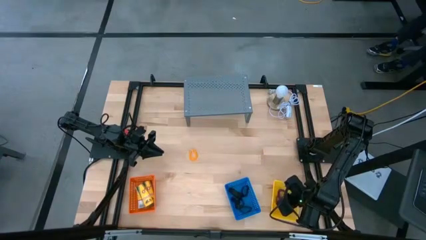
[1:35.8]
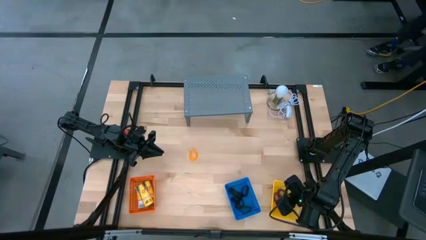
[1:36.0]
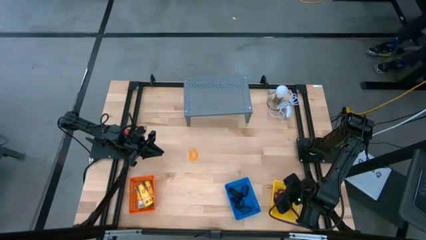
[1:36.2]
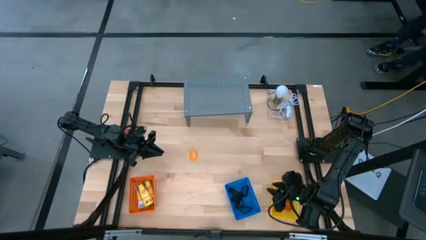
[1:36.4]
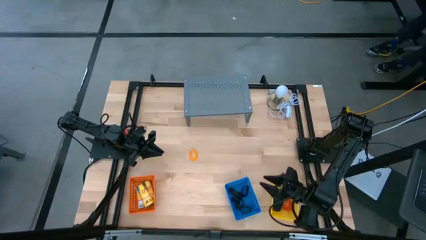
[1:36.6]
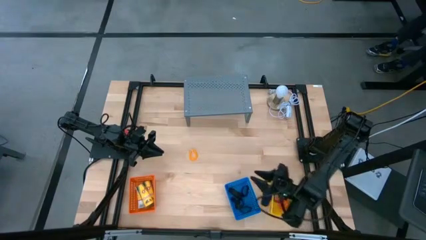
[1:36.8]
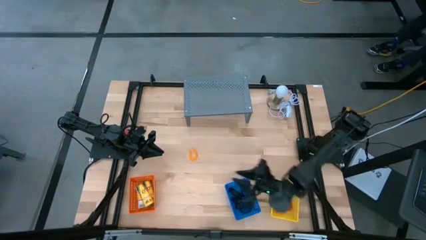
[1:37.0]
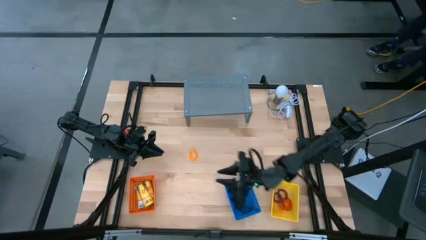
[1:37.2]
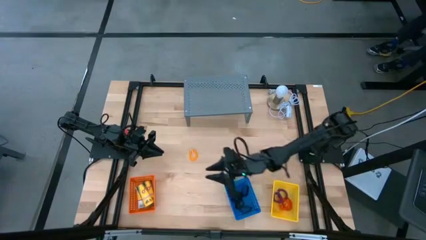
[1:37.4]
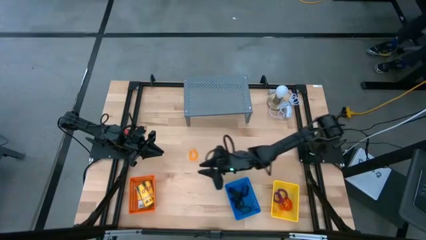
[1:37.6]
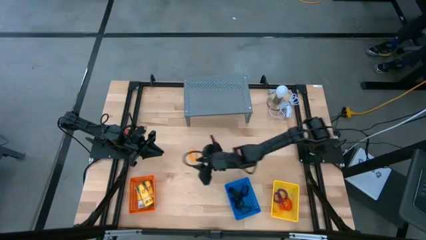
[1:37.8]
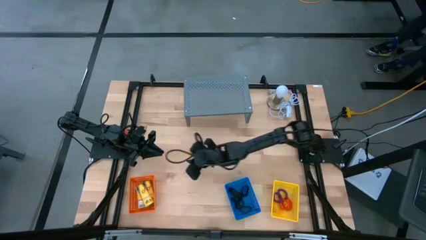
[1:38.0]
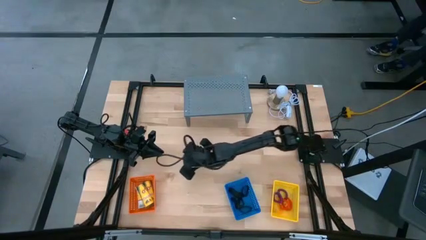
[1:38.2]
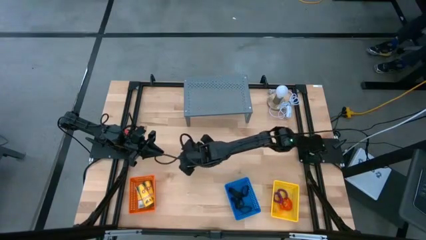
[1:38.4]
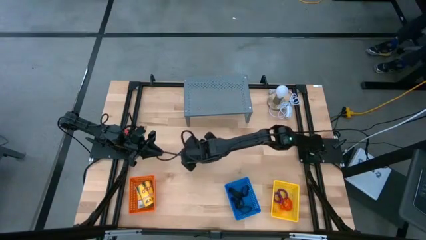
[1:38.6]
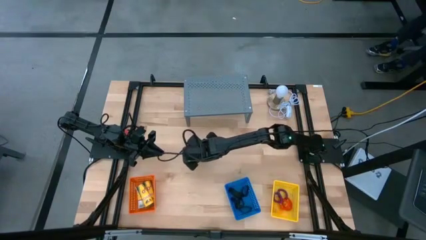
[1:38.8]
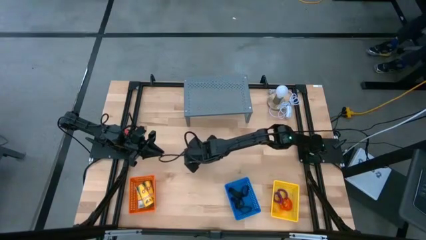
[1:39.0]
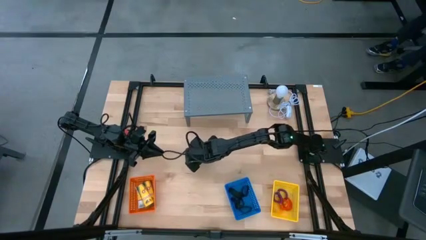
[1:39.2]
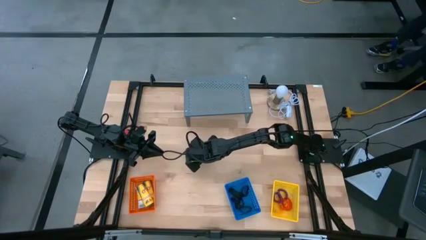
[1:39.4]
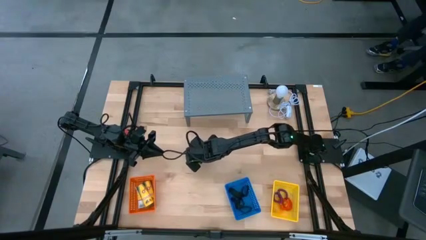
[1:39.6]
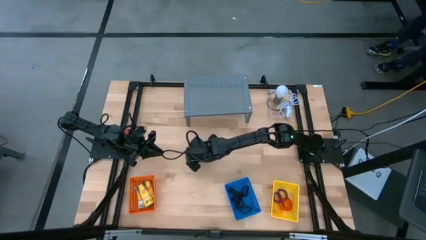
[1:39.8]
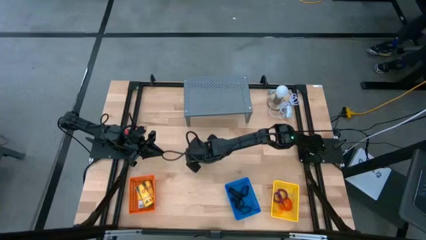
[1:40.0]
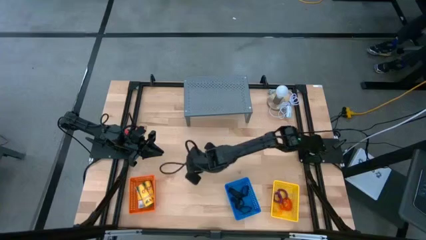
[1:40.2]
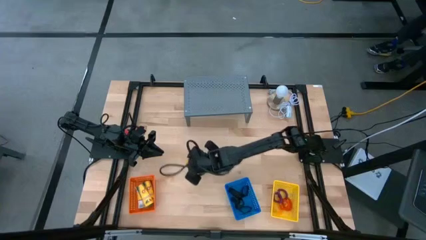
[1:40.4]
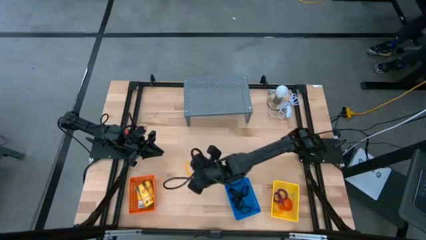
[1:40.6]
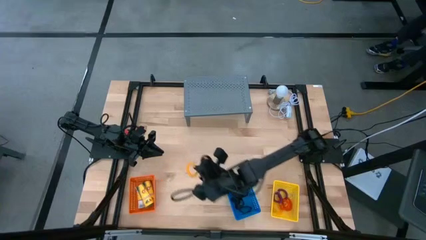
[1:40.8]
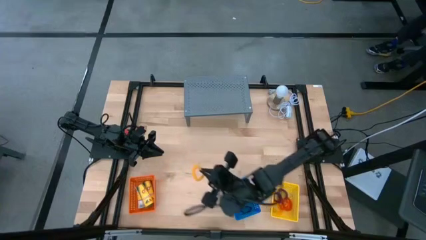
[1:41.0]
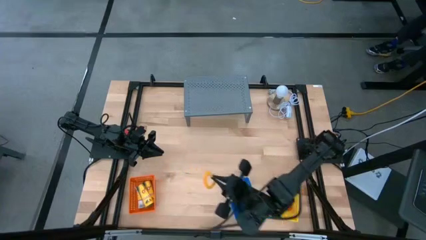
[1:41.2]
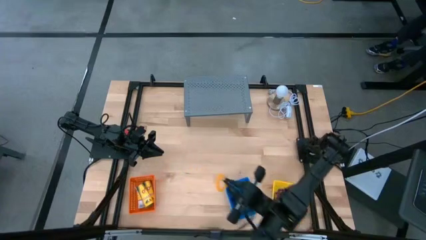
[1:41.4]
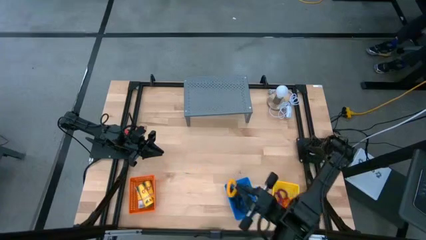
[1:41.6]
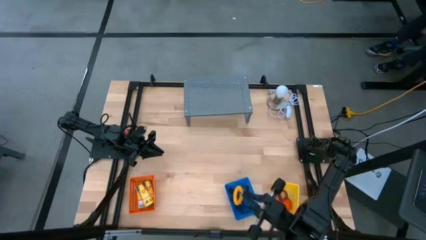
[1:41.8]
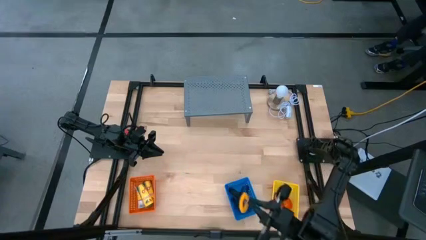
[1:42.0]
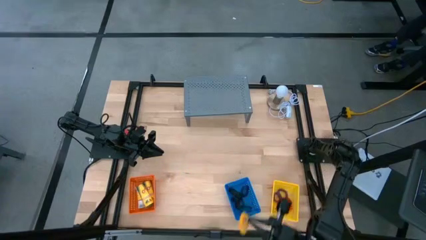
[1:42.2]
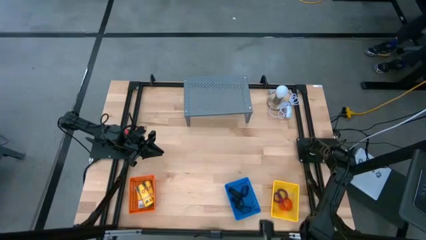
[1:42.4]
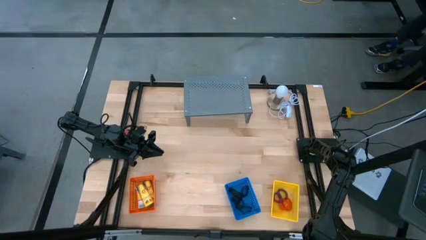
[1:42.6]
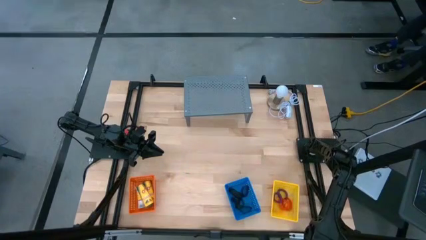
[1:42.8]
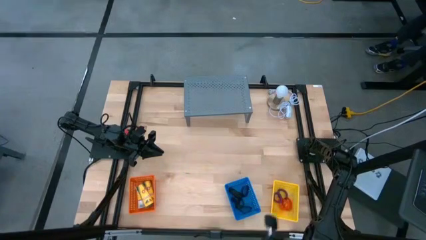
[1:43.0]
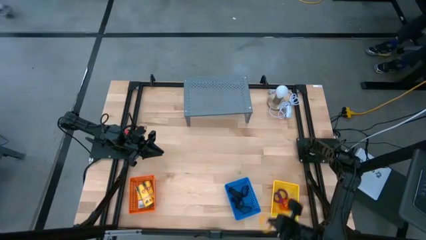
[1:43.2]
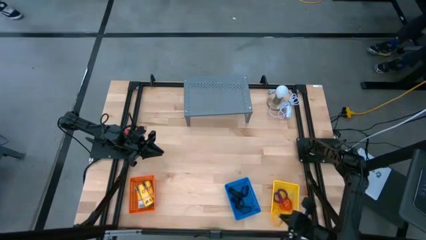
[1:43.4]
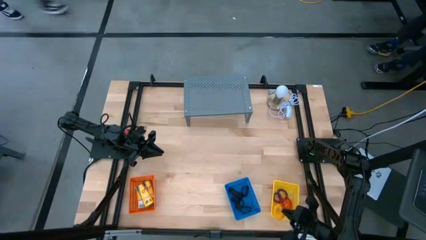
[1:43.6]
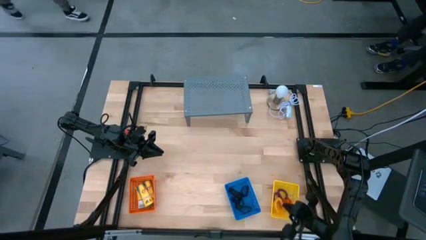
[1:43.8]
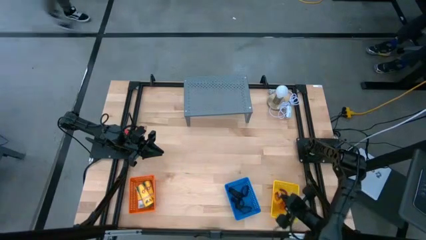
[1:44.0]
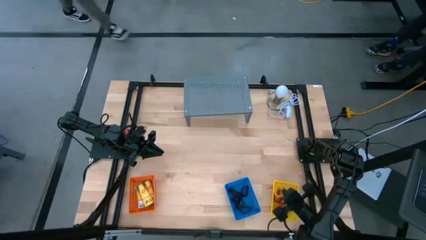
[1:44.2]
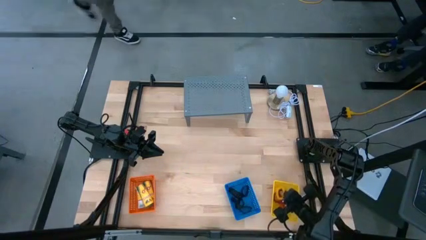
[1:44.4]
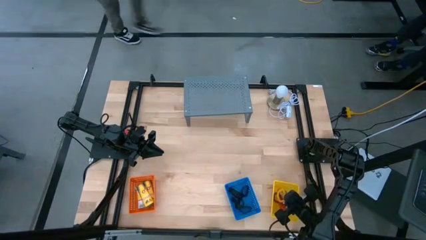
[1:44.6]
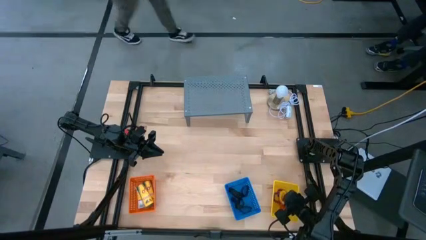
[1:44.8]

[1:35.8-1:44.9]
Task: Pick & Place Office Desk Supplies
Put the yellow spring keychain into the yellow bin

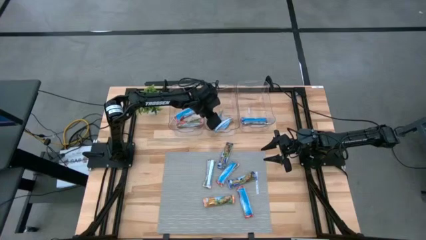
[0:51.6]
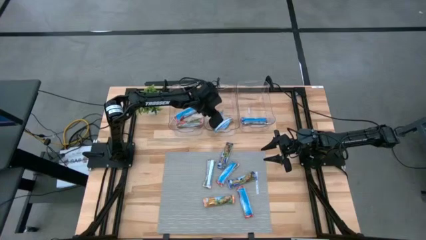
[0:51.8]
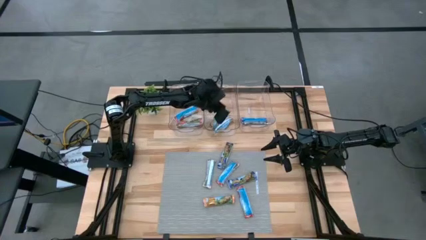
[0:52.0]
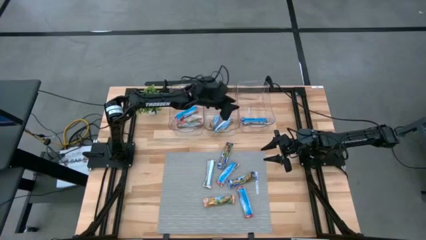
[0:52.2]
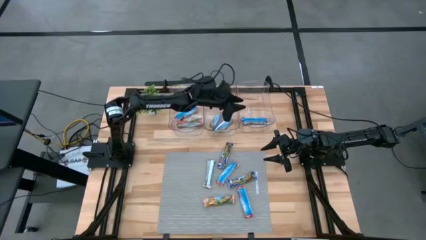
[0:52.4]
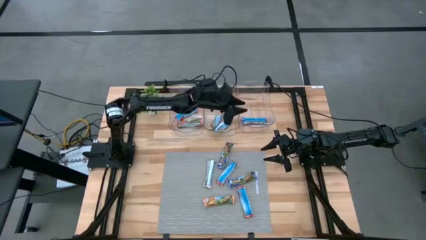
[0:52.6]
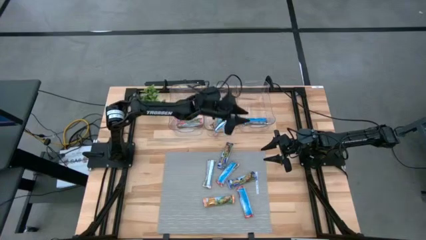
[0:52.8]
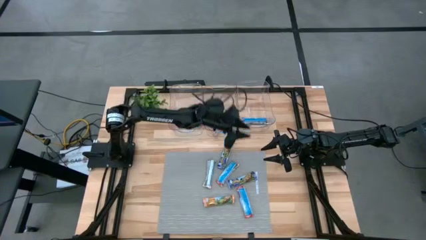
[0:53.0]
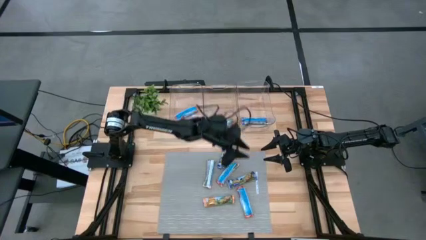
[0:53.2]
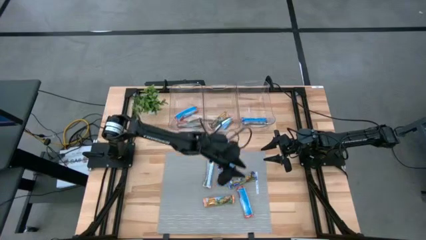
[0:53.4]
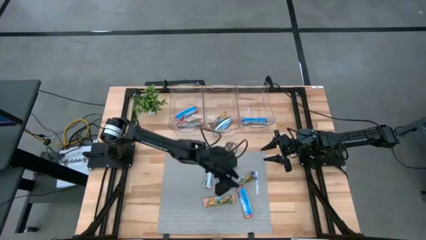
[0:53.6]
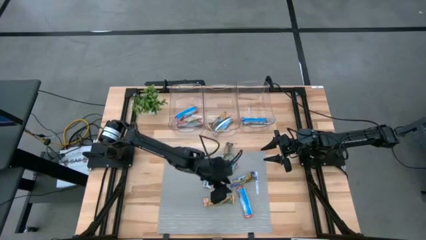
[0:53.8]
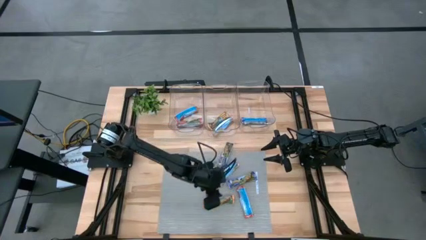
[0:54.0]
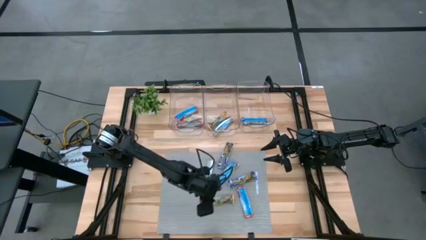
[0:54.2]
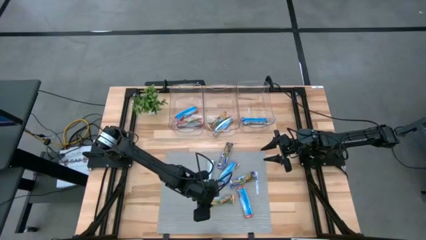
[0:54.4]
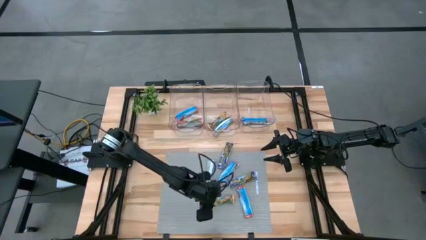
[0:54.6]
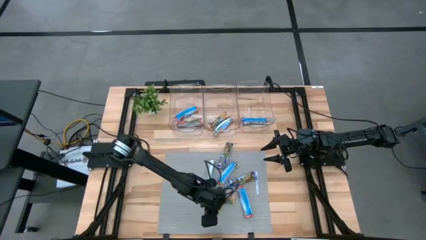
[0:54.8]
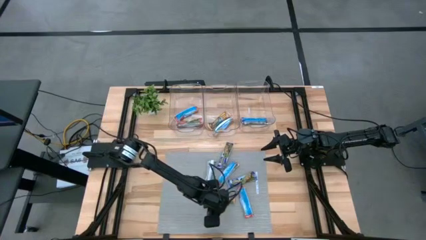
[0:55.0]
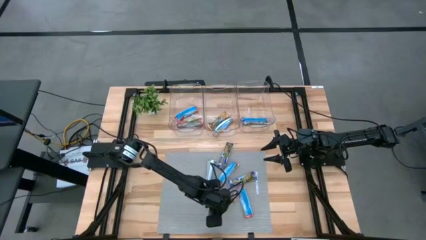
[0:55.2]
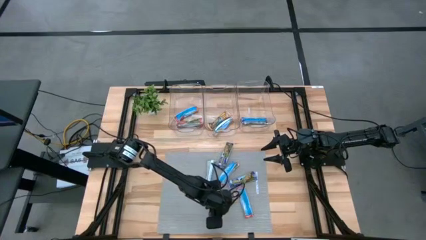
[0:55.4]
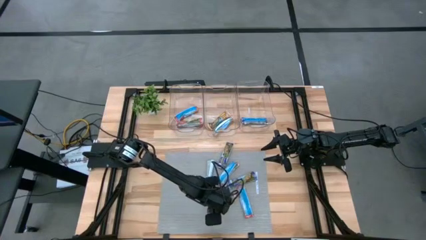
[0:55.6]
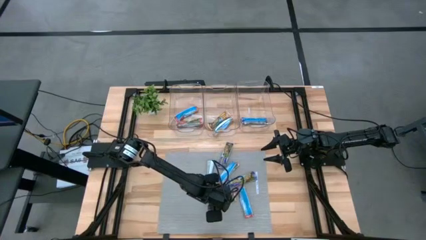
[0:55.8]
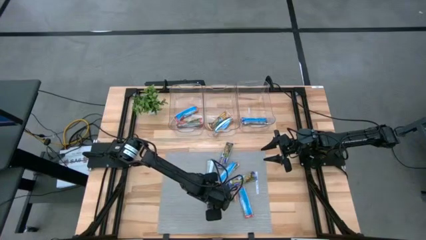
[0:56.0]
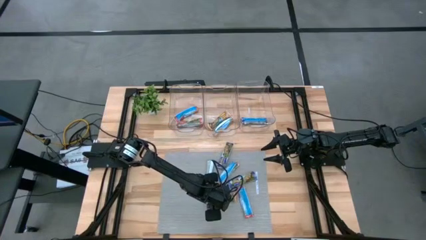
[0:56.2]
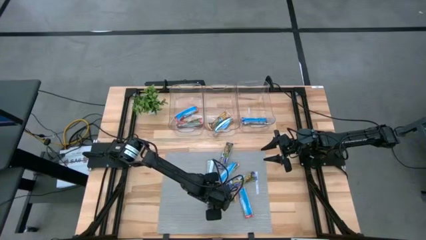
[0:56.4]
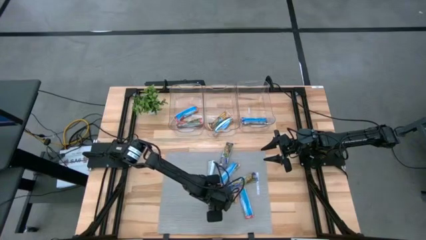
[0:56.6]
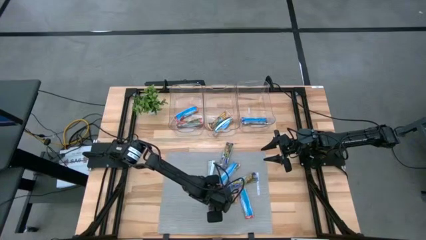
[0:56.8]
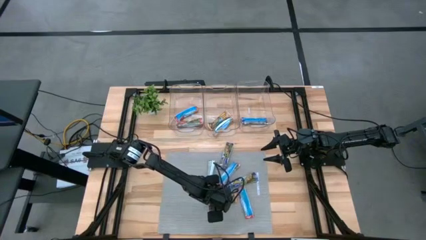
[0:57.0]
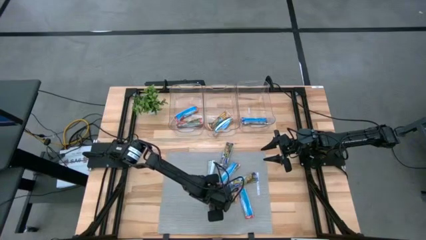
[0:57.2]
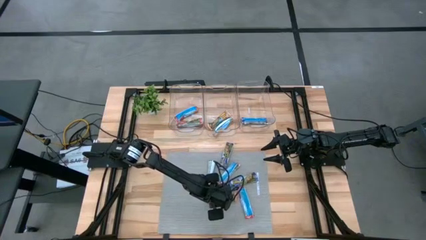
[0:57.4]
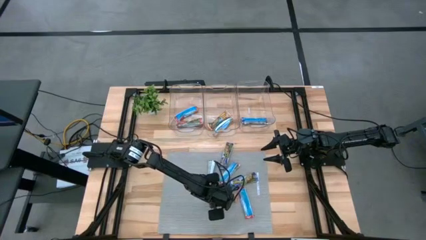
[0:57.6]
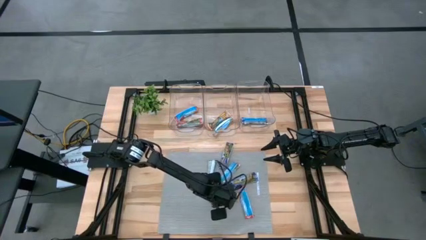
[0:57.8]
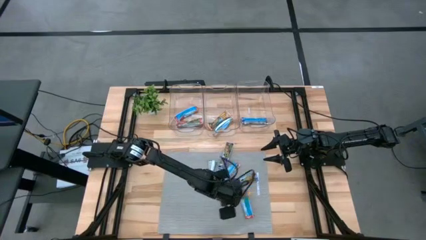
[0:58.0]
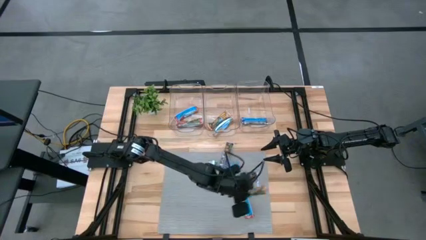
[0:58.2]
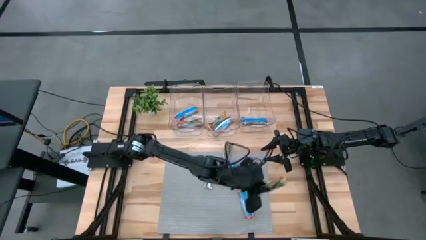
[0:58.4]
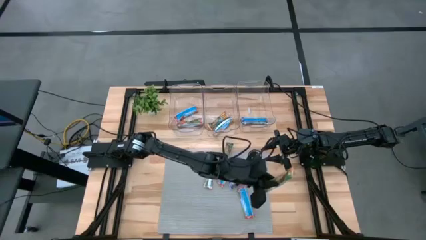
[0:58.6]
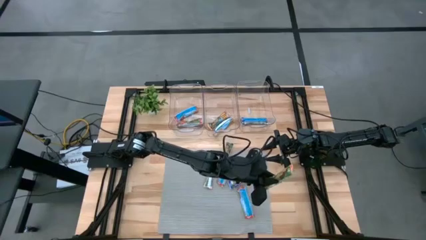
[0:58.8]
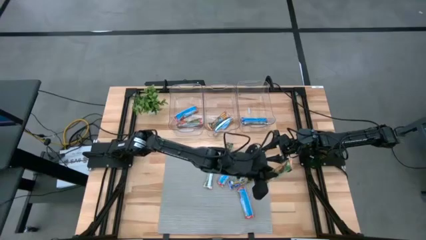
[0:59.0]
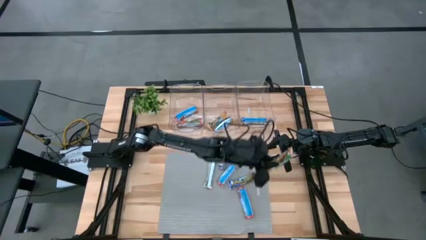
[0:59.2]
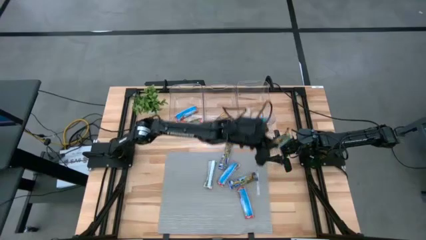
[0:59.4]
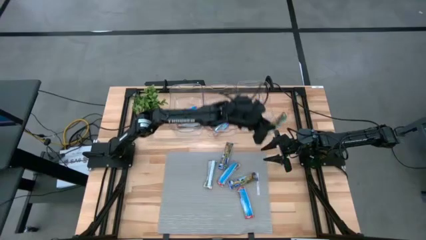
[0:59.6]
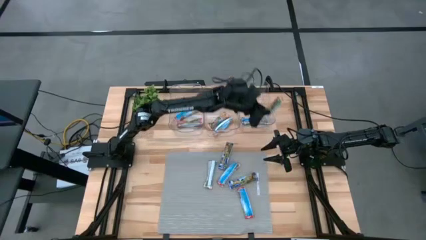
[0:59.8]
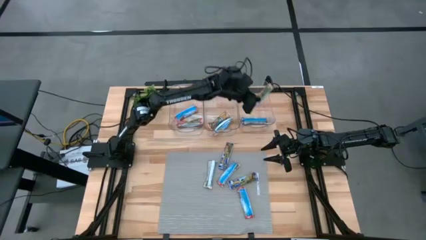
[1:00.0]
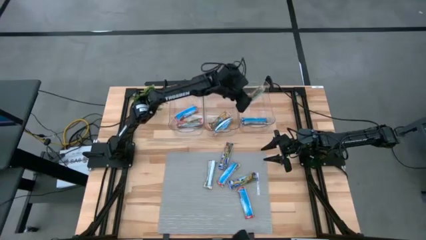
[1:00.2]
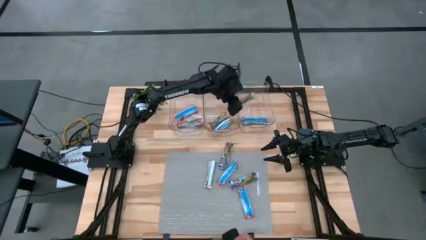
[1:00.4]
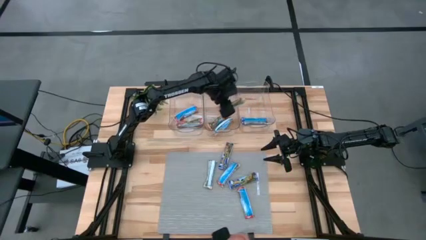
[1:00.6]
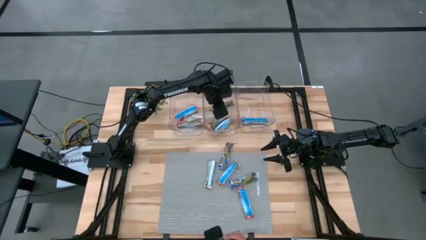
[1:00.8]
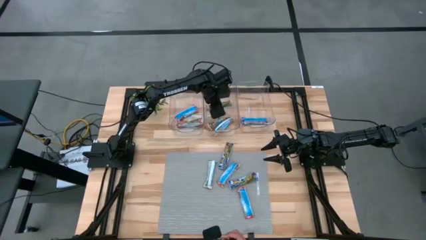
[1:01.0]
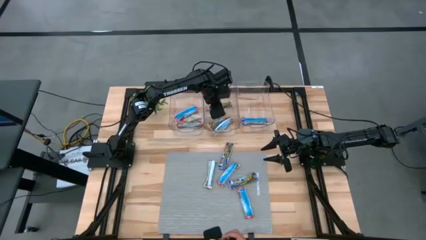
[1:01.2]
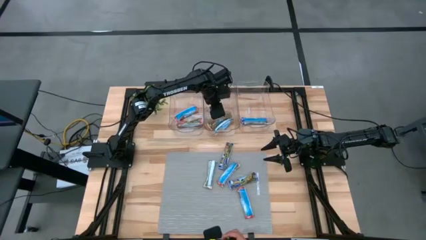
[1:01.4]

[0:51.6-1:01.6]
Task: Pick and place Granola Bars by type
Put the yellow granola bar into the middle transparent bin
